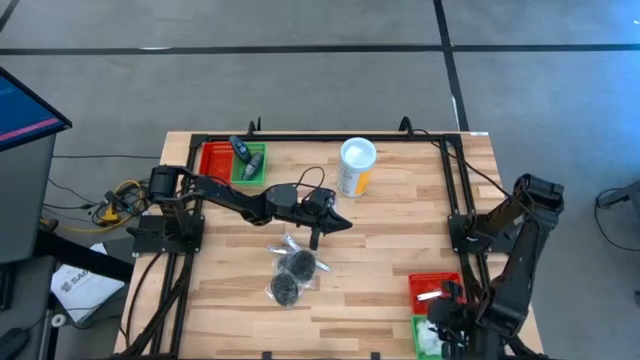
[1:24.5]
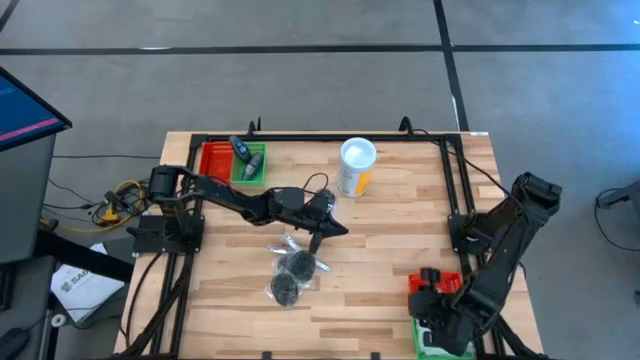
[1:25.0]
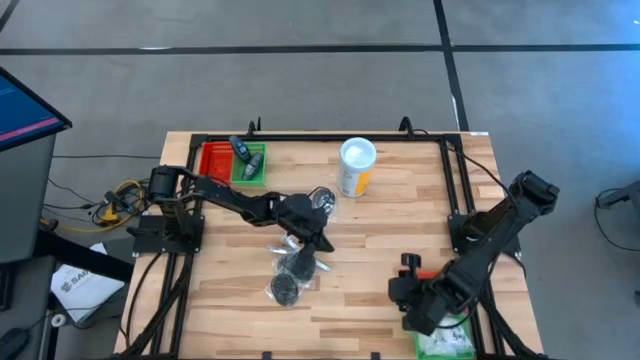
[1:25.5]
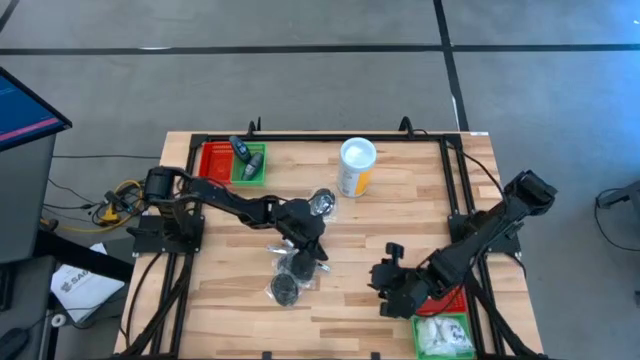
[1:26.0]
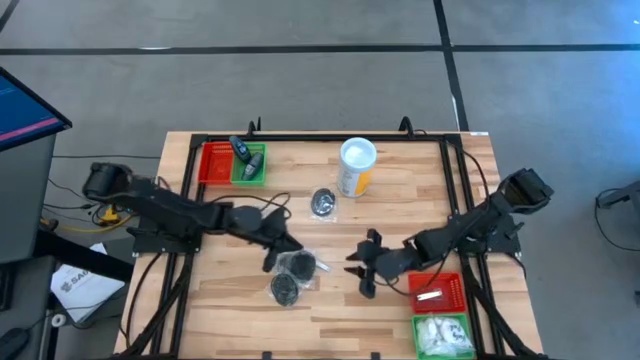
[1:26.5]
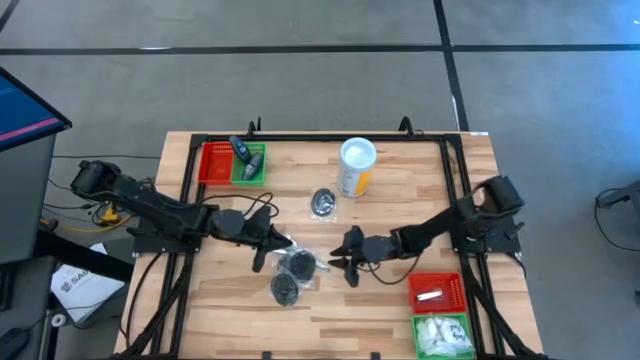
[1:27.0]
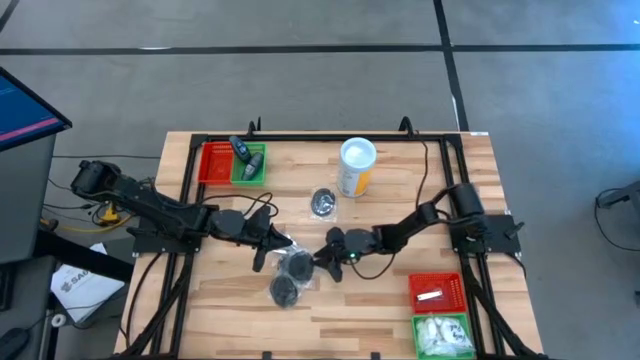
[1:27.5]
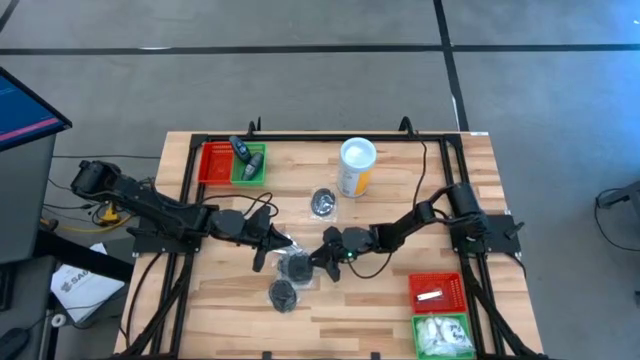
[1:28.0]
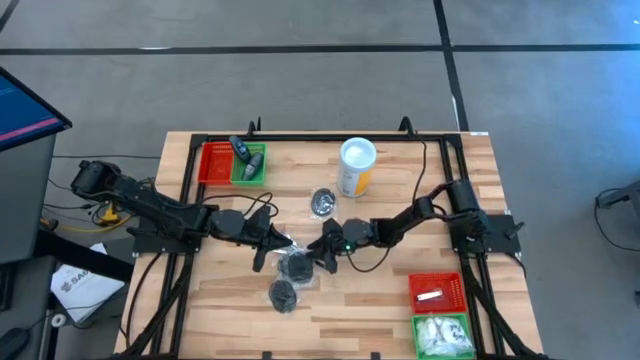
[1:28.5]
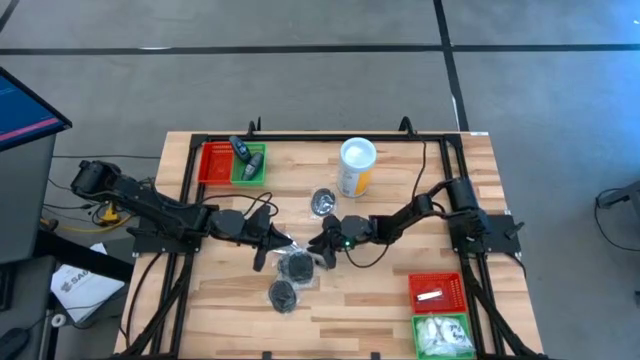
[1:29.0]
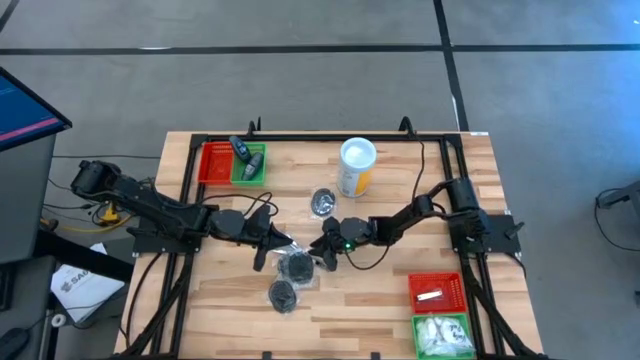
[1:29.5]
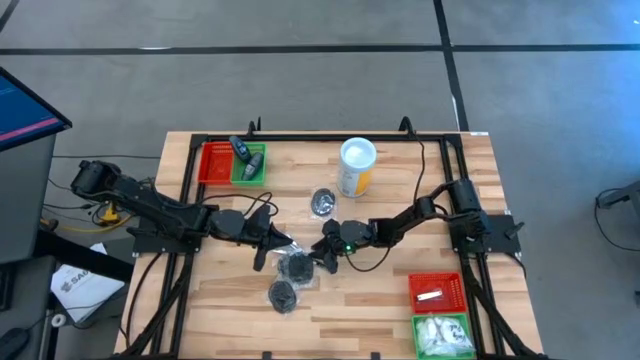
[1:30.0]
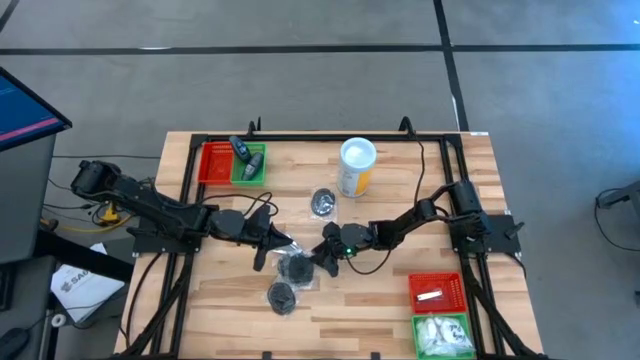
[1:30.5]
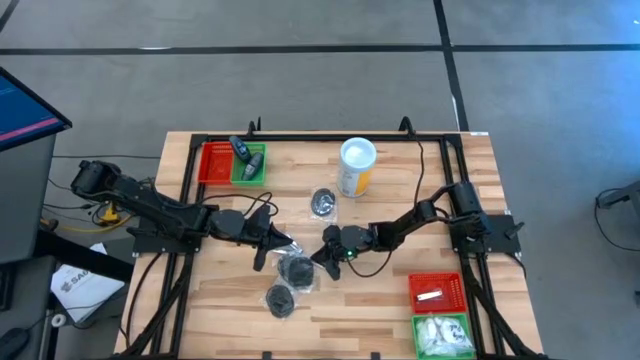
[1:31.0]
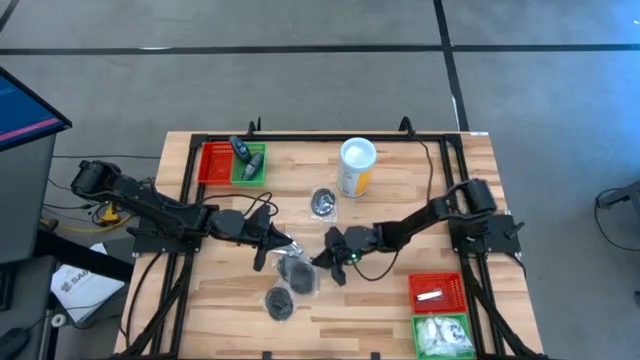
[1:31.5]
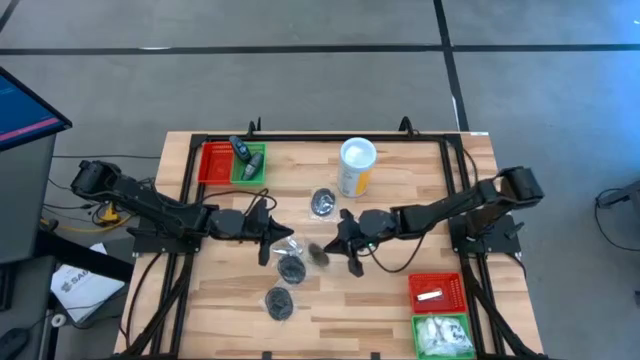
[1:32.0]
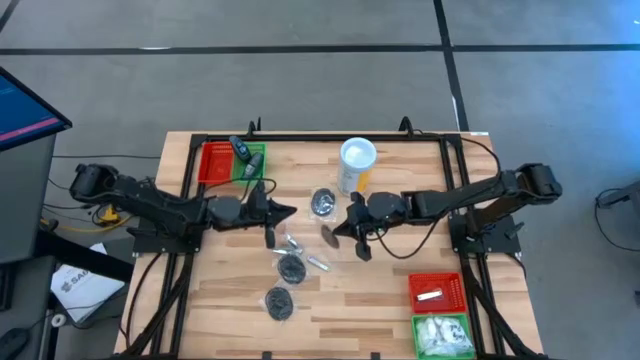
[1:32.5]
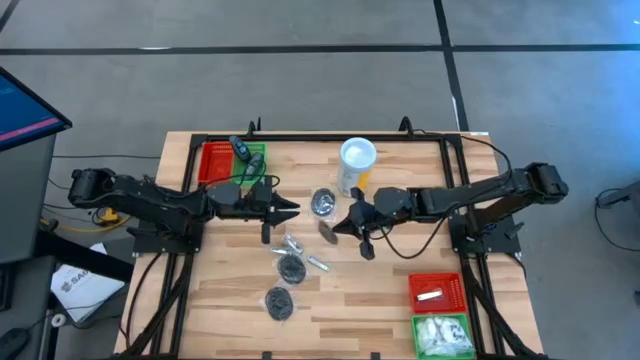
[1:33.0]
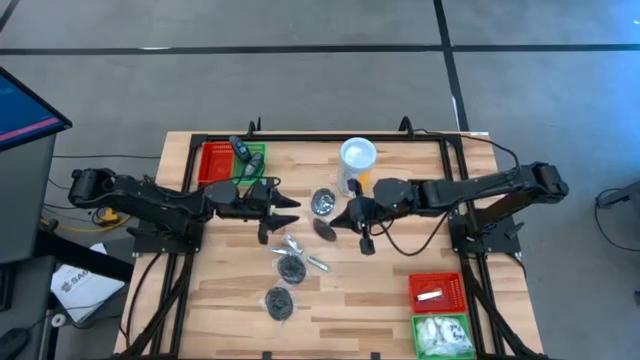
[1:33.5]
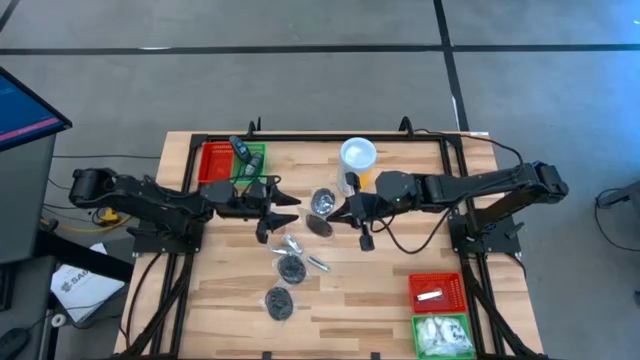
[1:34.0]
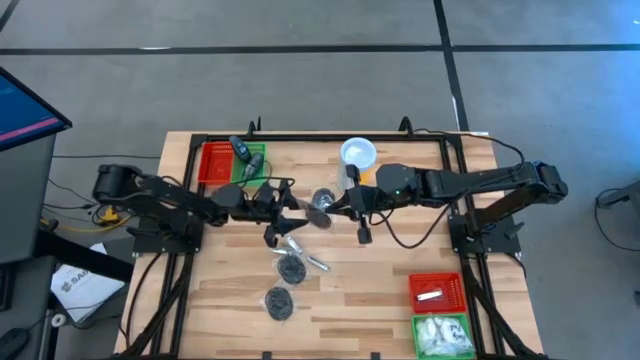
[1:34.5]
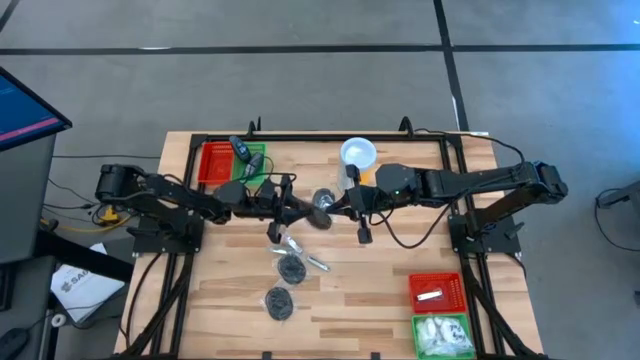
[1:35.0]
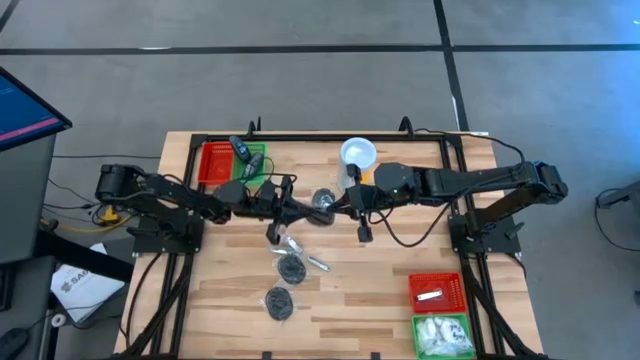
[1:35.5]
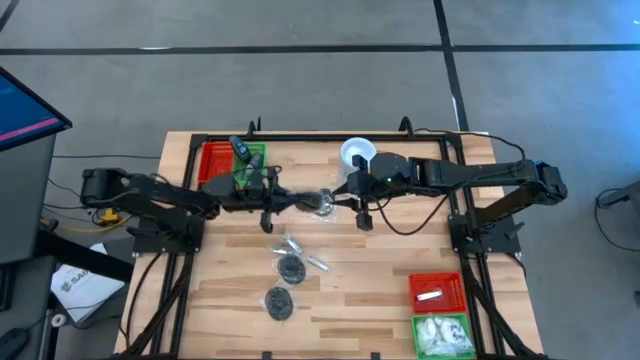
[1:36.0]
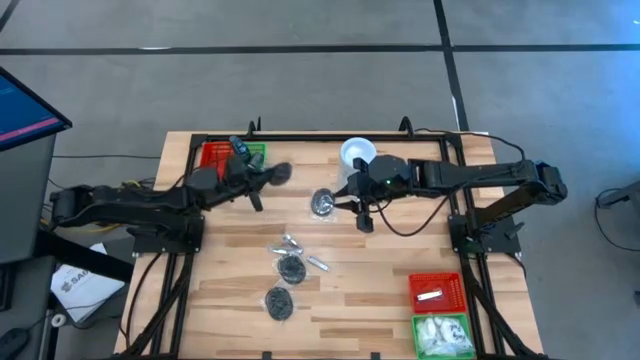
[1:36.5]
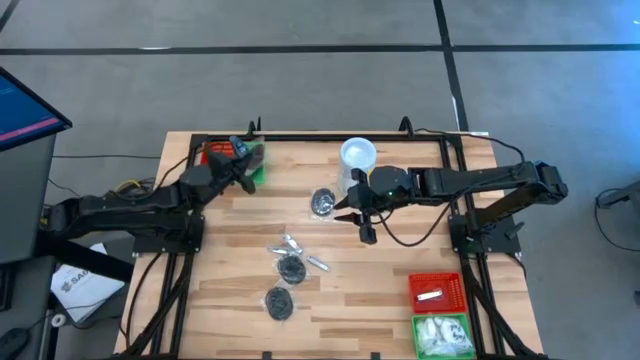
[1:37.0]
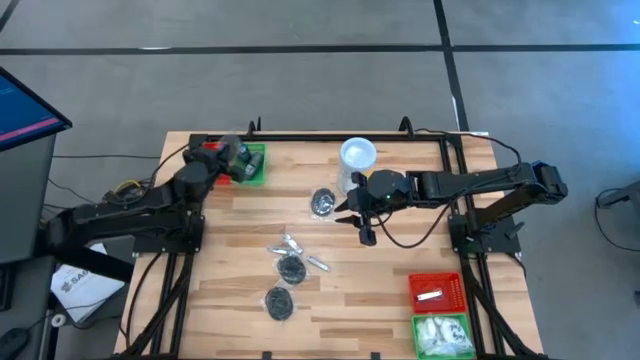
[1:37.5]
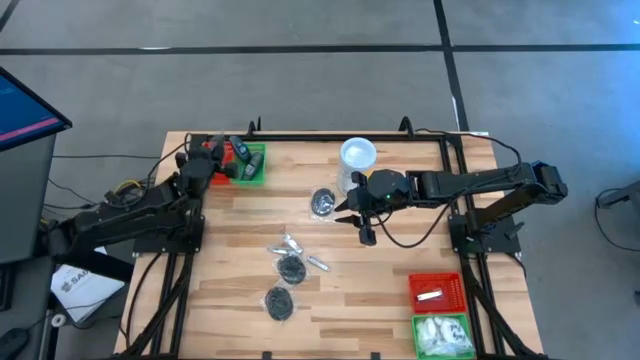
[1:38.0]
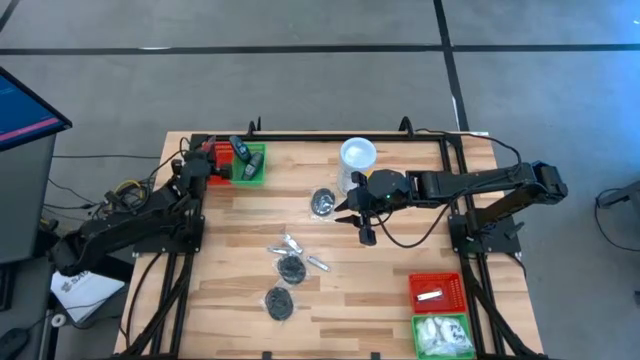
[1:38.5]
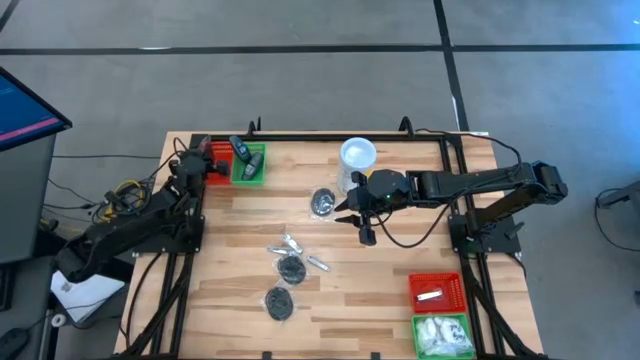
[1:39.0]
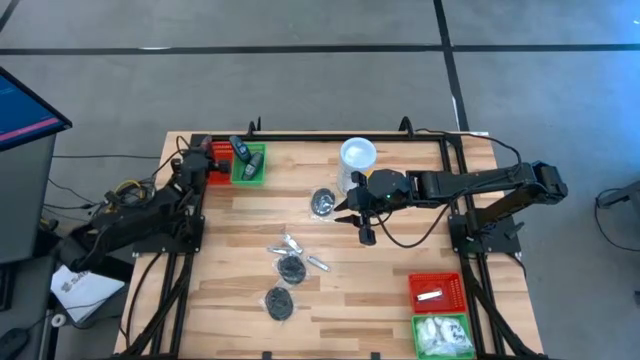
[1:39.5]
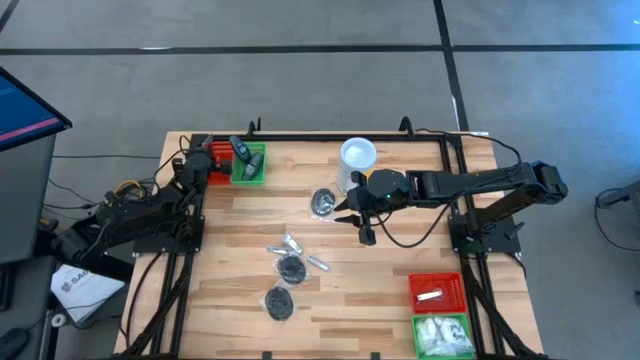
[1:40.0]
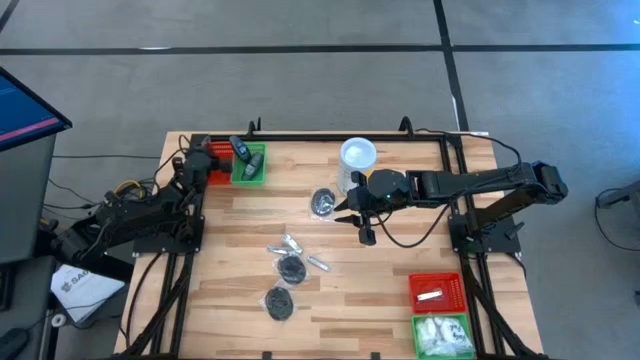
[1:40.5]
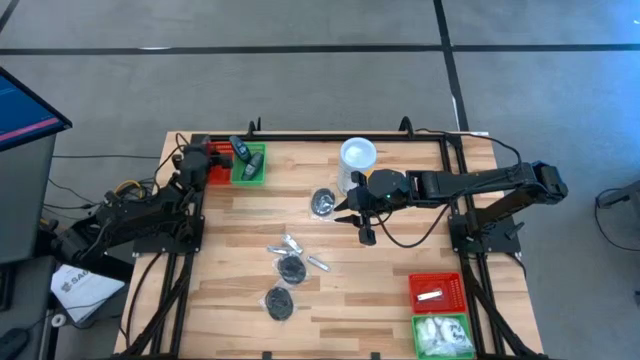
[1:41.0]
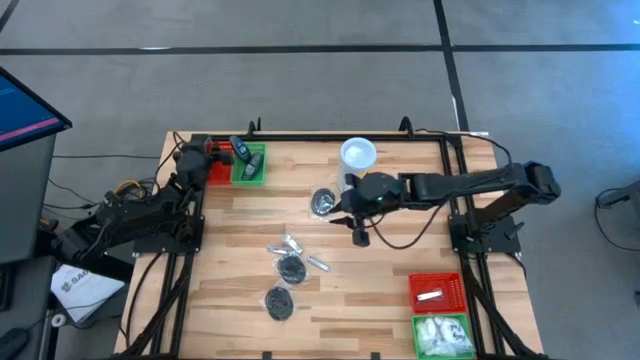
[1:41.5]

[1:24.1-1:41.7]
Task: Pick & Place Travel size toiletries
Put the black hairbrush into the top red bin

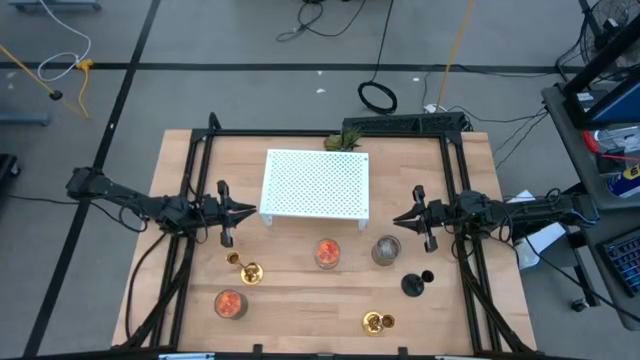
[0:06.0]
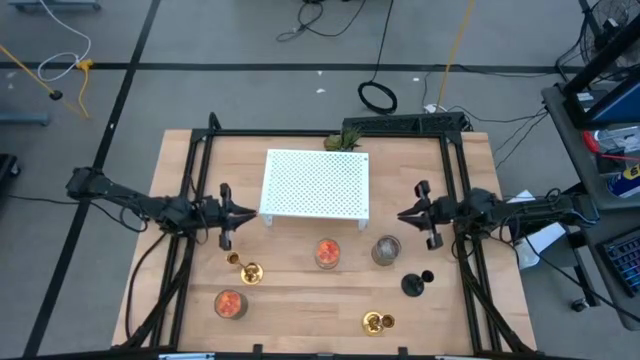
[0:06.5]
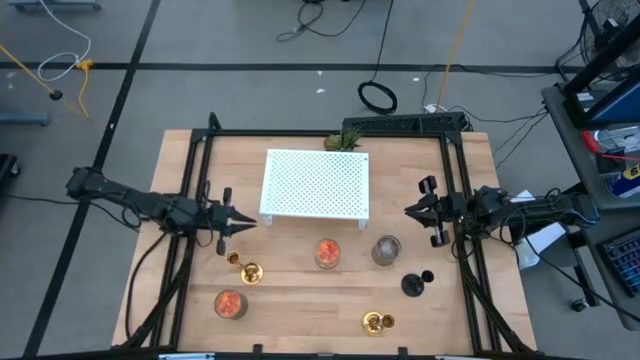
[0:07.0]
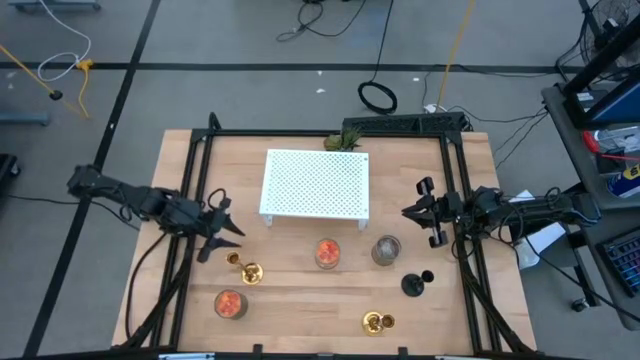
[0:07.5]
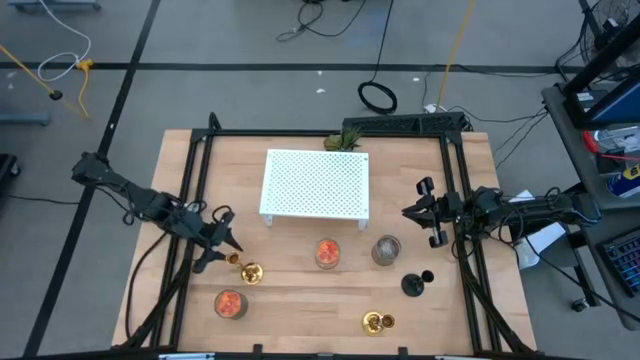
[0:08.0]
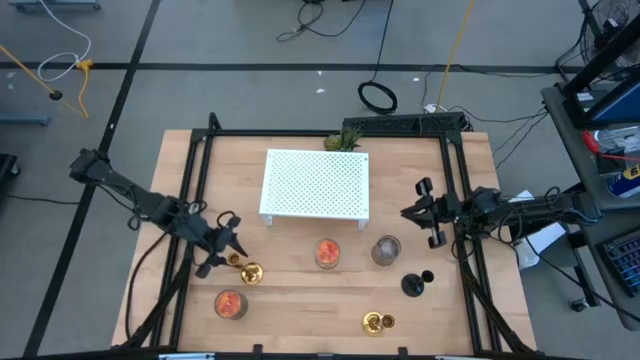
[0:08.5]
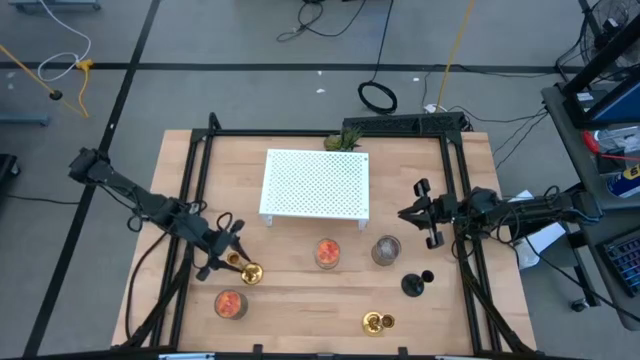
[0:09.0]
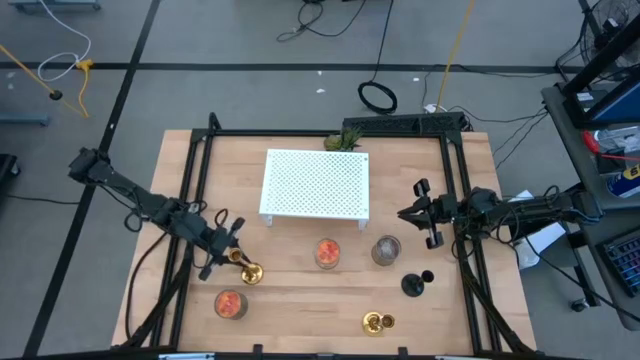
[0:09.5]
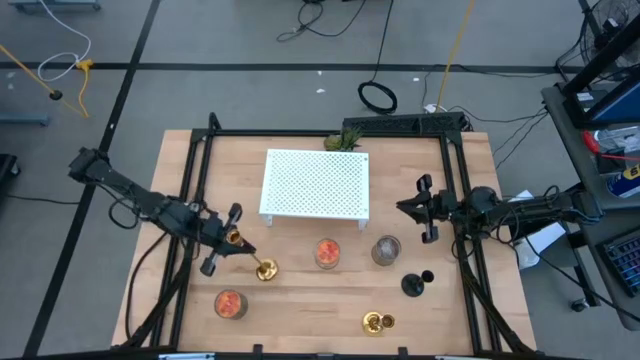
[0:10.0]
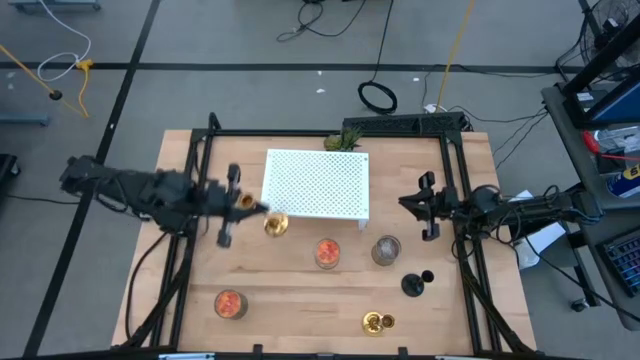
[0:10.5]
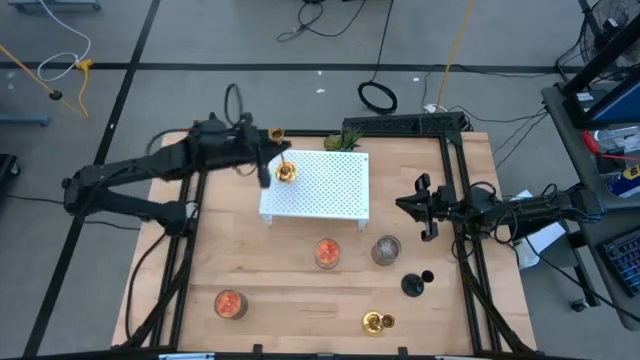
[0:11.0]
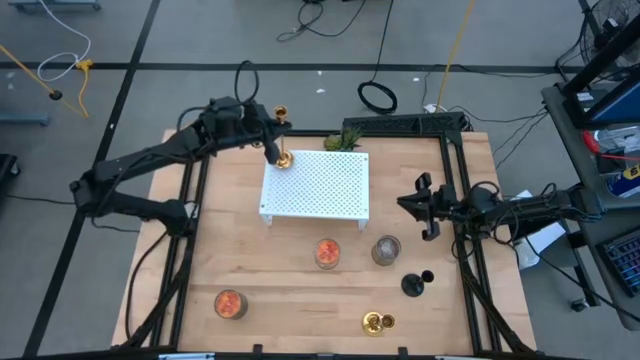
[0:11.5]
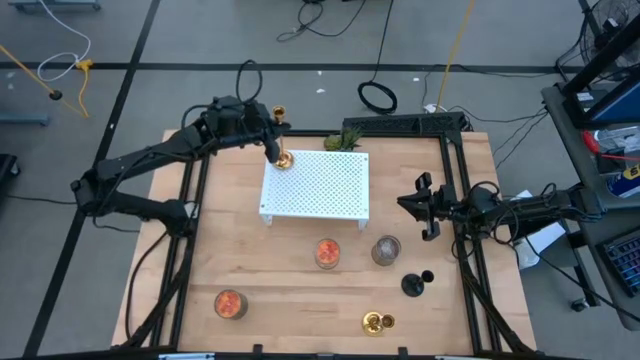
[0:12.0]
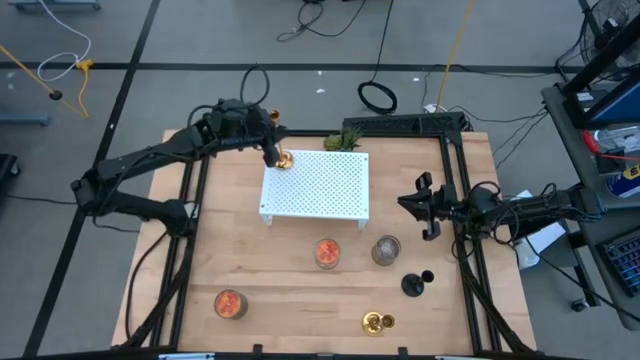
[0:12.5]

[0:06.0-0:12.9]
Task: Pick & Place candle stick holders
Put the left gold candle holder on the shelf
